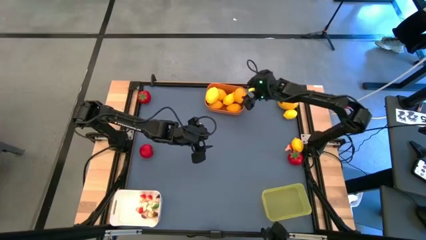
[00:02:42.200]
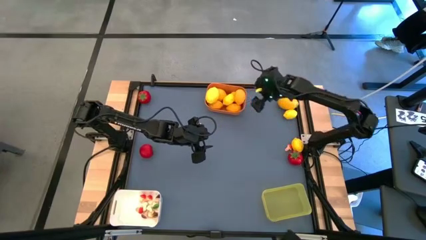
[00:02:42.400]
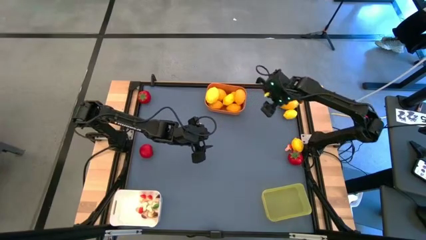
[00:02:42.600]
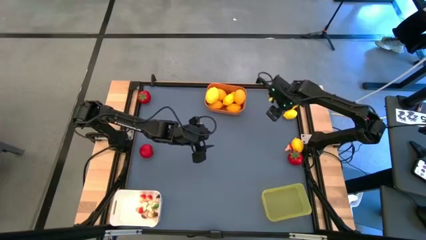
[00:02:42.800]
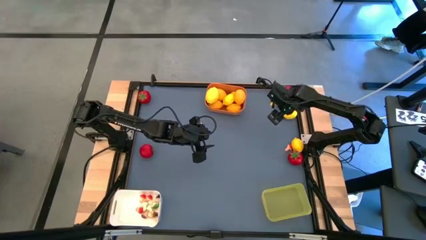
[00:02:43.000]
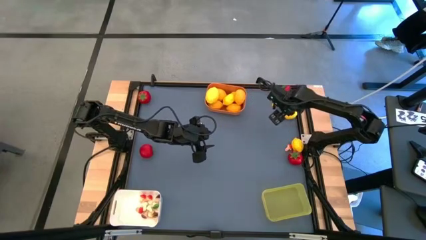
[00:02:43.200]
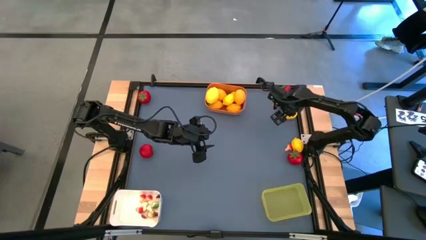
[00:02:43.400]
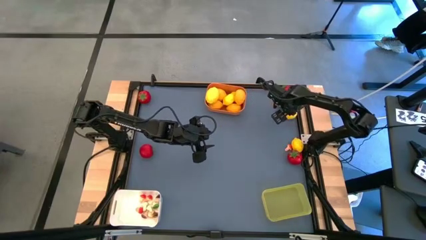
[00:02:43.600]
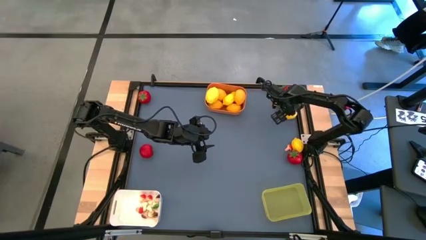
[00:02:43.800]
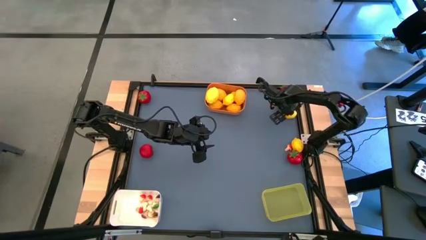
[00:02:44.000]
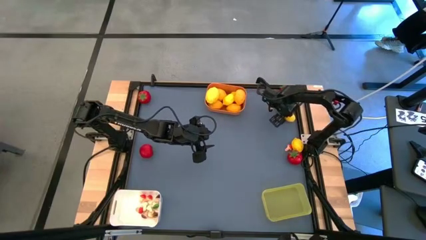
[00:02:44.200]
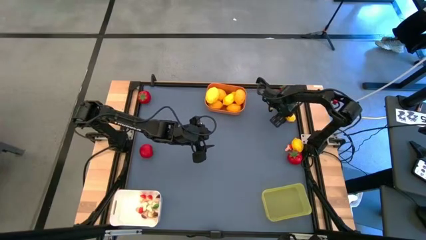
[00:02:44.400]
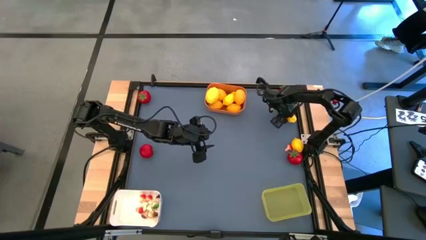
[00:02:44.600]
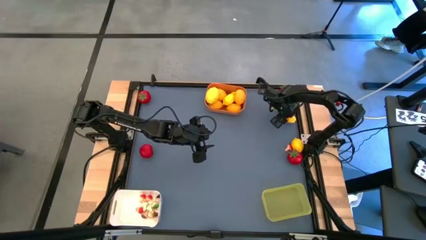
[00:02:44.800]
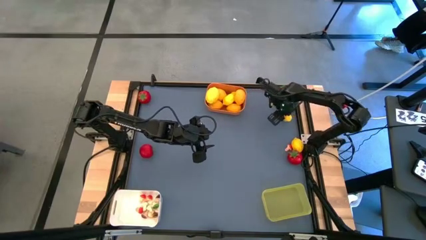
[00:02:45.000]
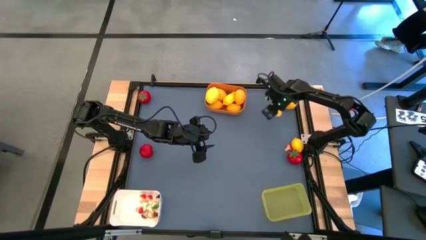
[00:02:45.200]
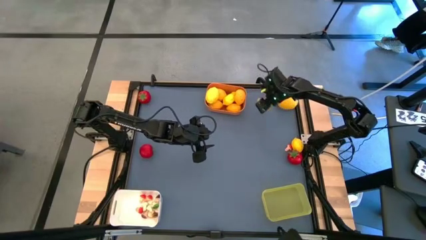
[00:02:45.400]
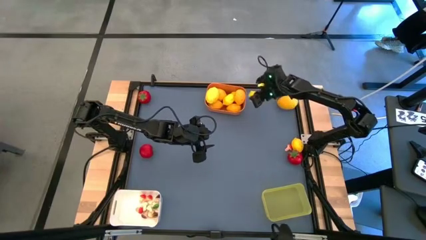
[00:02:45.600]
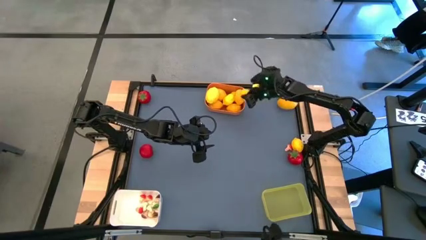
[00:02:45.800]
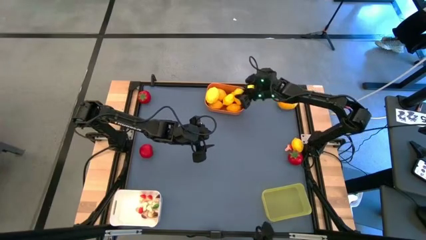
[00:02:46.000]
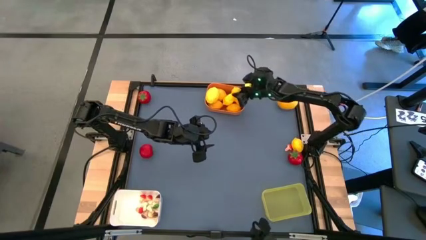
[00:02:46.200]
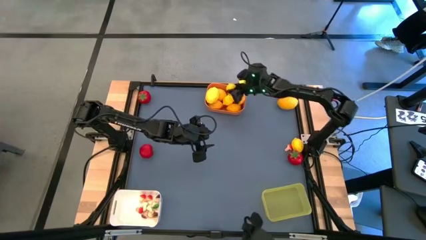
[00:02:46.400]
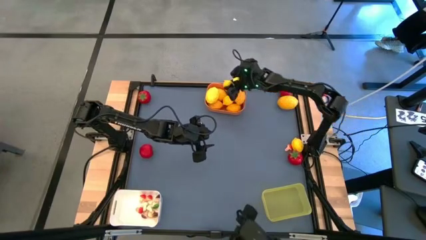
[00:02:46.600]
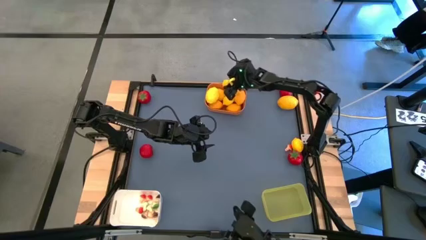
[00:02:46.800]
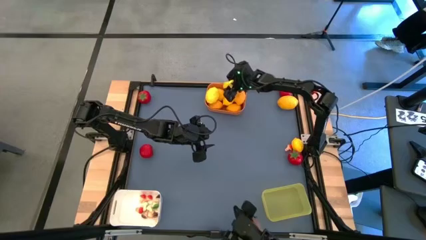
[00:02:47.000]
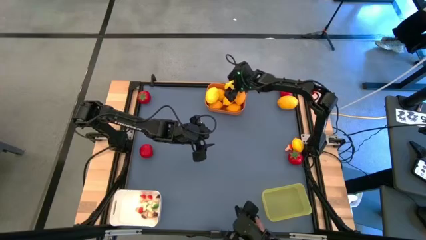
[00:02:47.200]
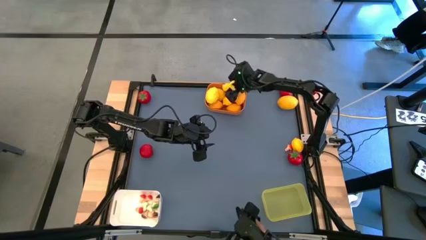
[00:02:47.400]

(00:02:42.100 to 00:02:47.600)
Task: Sort produce into baskets
Put the yellow lemon into the orange bin

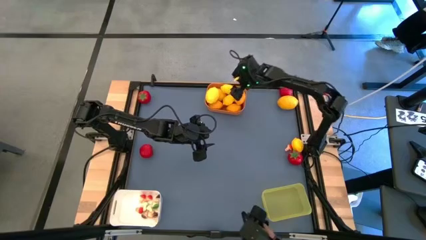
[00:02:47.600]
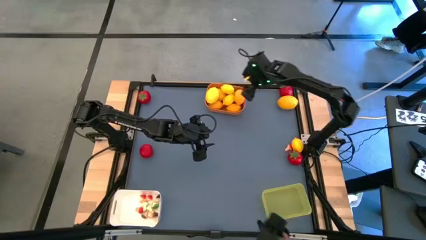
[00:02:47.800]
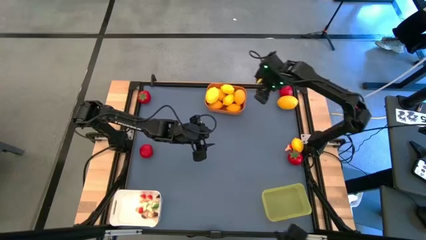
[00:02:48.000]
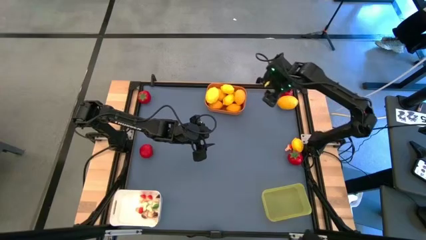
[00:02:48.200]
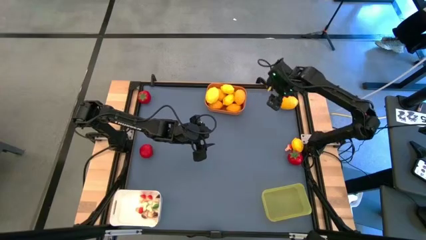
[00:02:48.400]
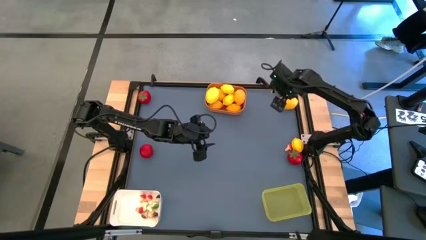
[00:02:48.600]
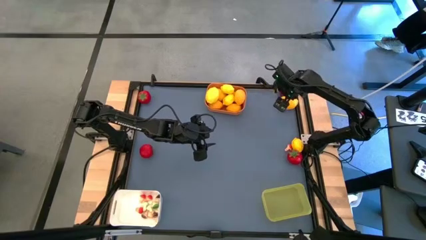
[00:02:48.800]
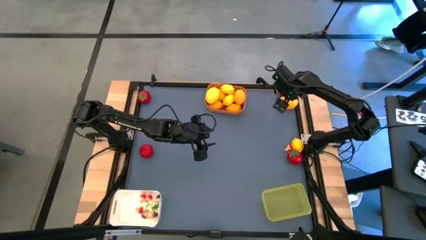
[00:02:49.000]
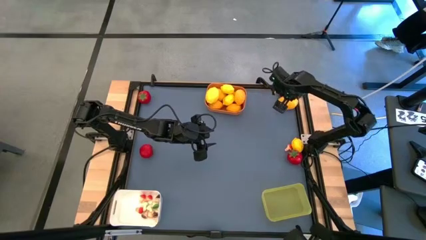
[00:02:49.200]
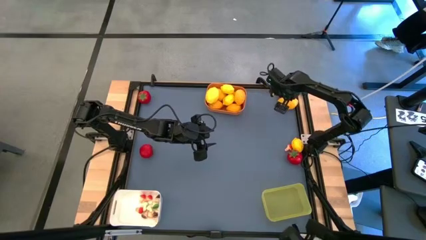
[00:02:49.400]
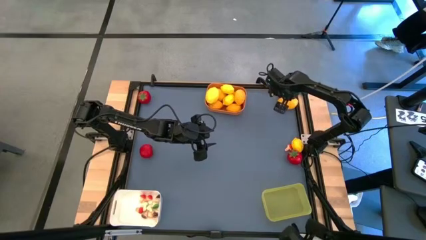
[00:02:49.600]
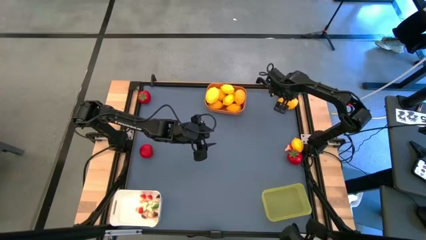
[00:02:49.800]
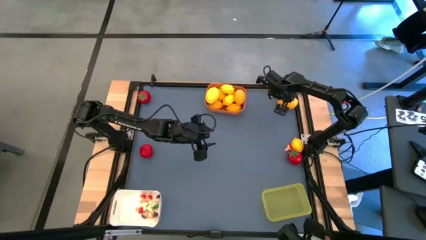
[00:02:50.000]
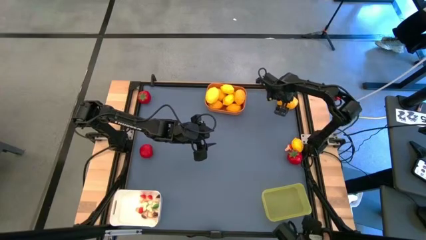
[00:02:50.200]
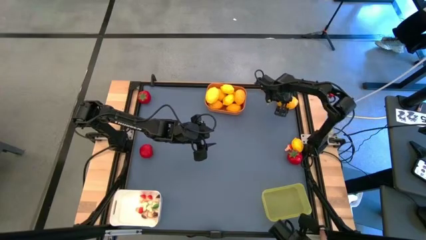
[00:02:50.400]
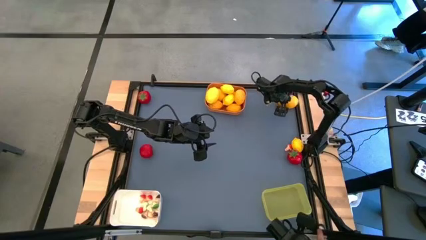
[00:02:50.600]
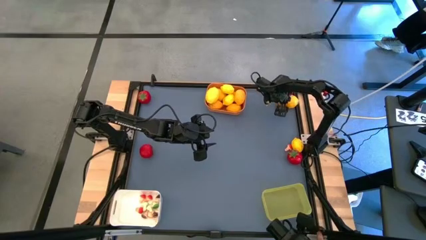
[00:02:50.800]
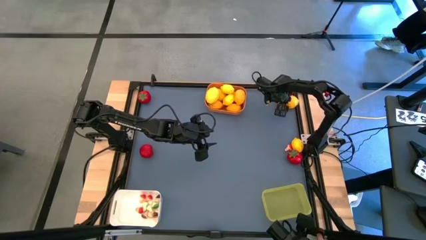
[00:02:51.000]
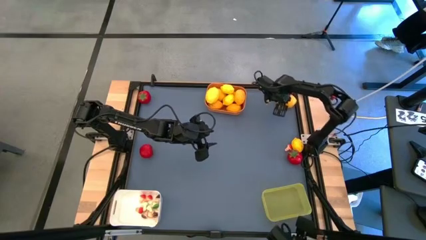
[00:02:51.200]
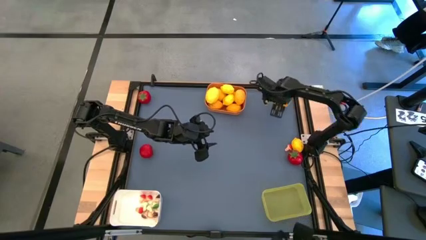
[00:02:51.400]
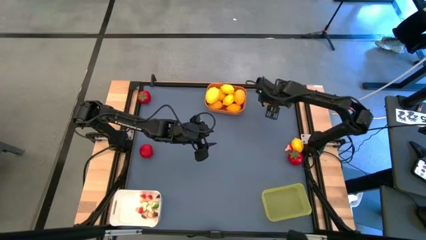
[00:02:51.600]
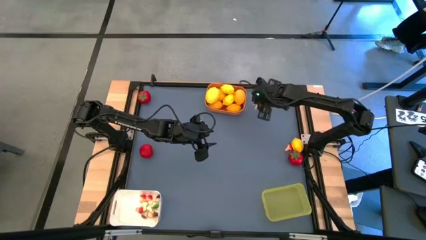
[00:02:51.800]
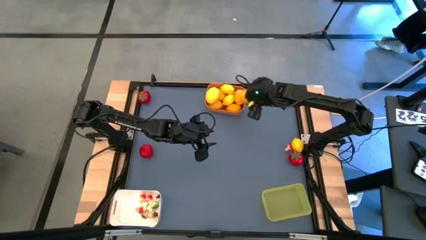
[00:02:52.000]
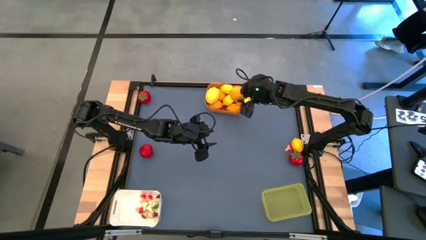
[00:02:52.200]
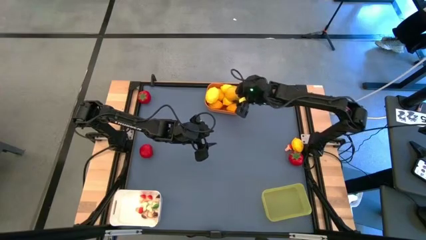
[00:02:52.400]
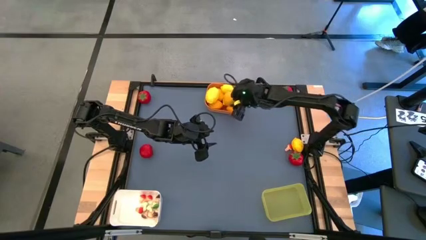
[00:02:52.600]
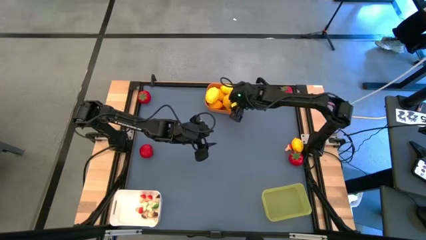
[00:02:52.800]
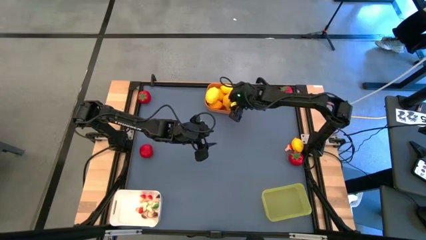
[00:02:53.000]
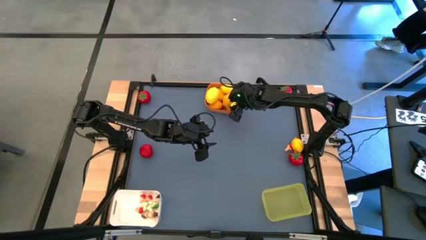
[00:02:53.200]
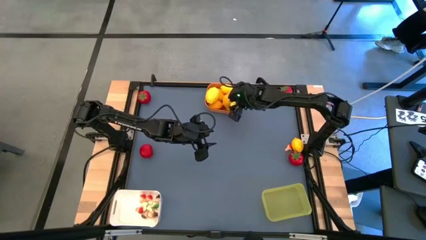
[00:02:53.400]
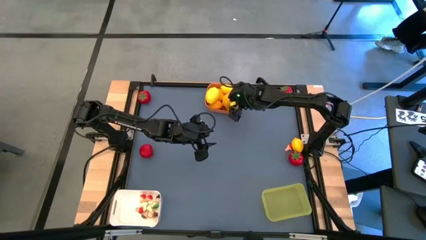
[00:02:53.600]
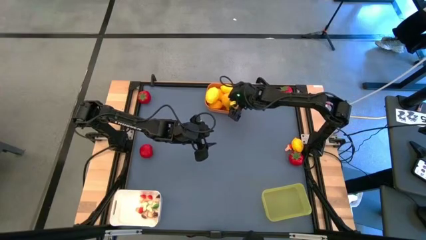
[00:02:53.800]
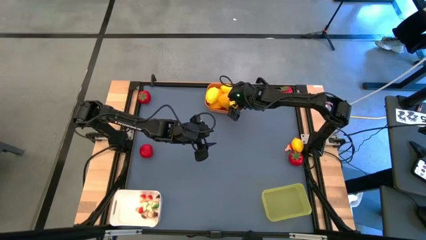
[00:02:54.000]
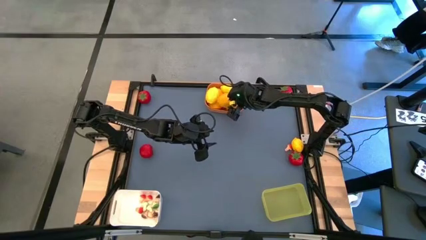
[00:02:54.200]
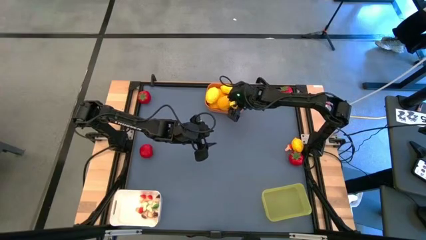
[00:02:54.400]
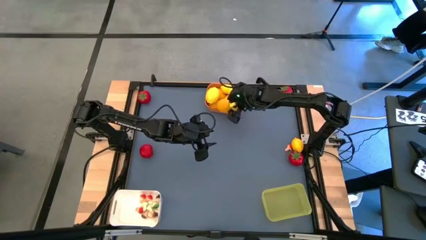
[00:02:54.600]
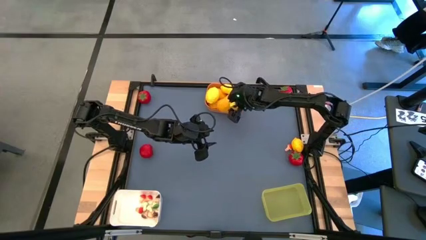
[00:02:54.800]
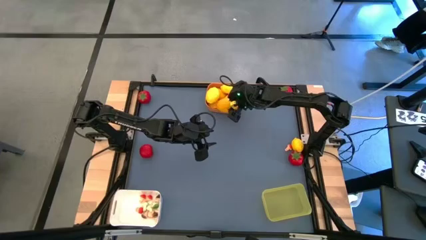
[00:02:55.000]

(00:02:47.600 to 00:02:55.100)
Put the yellow lemon into the orange bin
